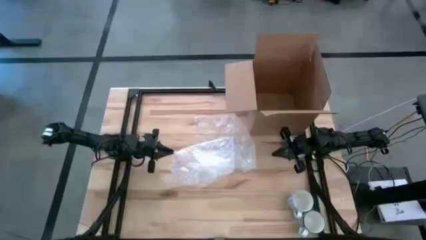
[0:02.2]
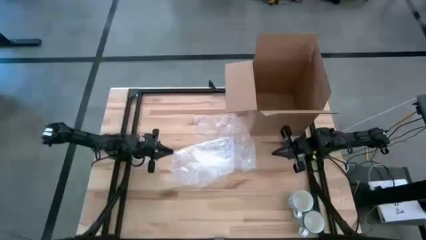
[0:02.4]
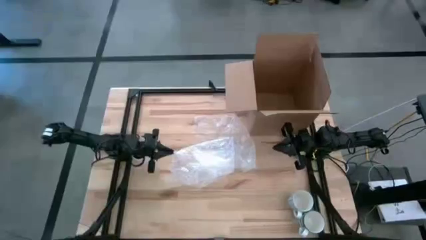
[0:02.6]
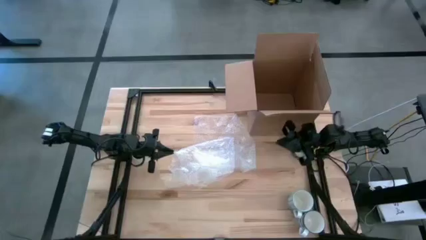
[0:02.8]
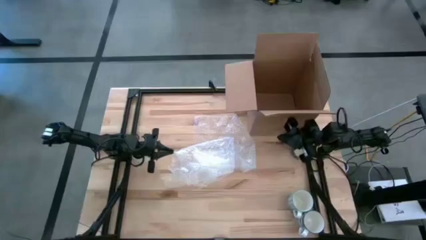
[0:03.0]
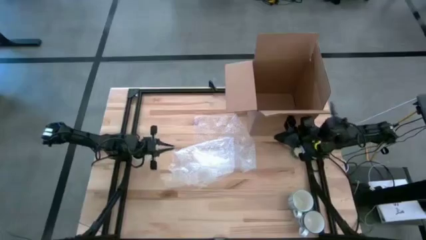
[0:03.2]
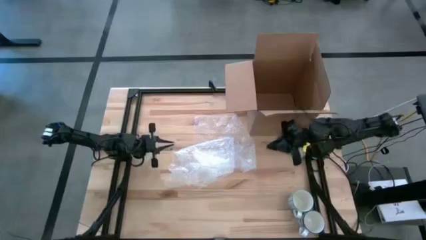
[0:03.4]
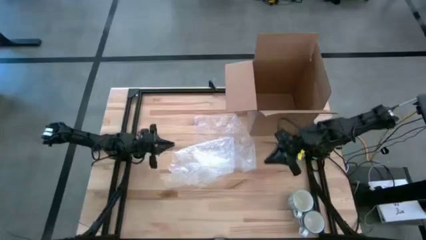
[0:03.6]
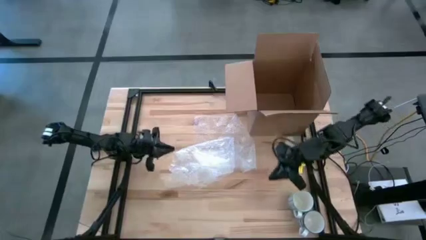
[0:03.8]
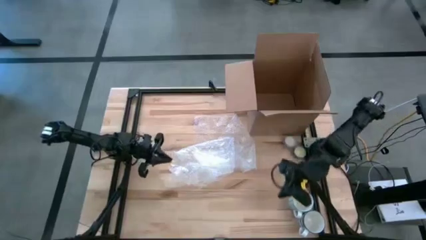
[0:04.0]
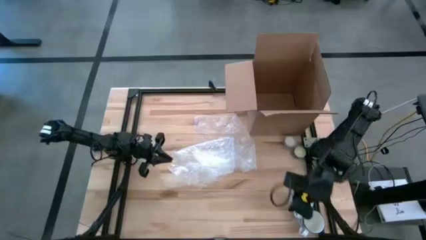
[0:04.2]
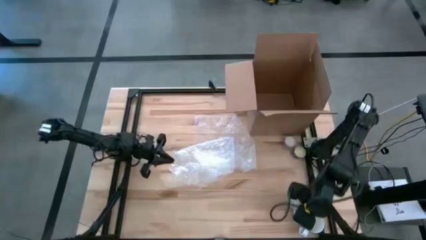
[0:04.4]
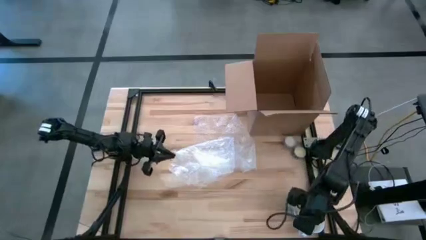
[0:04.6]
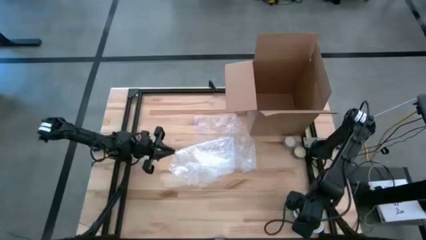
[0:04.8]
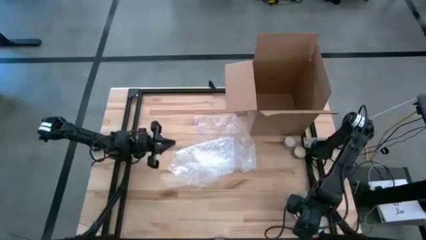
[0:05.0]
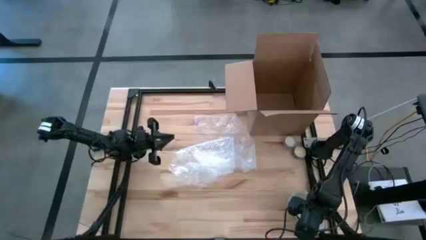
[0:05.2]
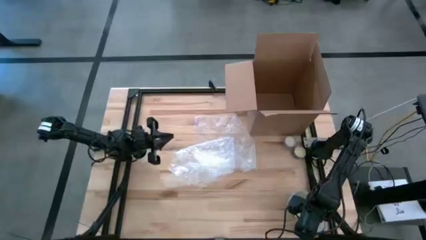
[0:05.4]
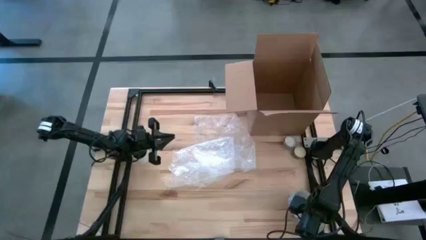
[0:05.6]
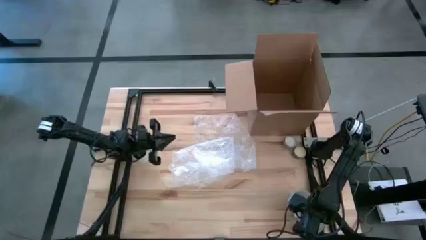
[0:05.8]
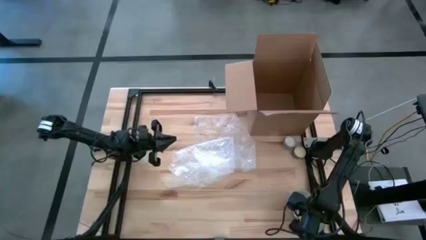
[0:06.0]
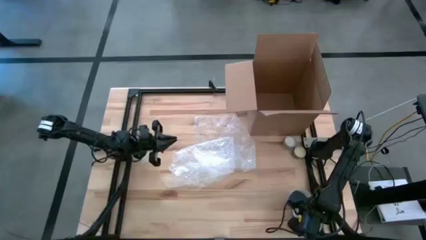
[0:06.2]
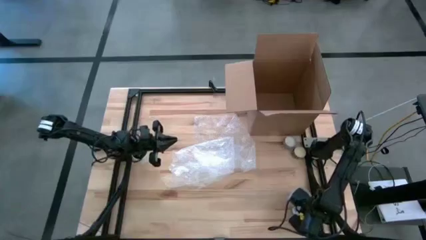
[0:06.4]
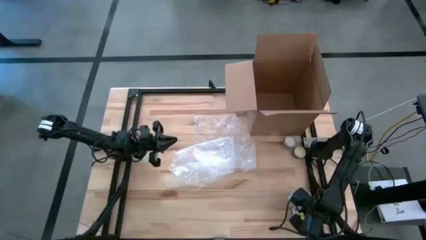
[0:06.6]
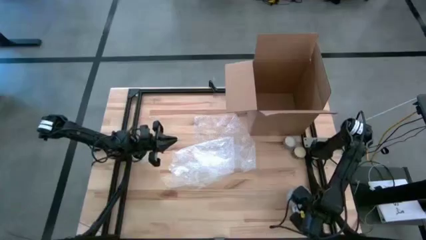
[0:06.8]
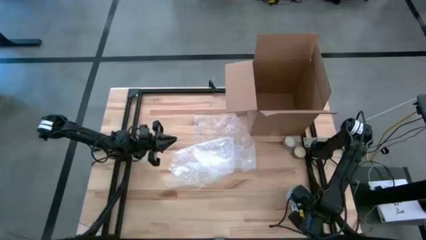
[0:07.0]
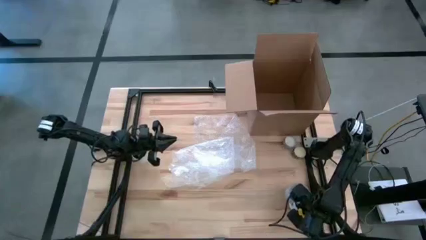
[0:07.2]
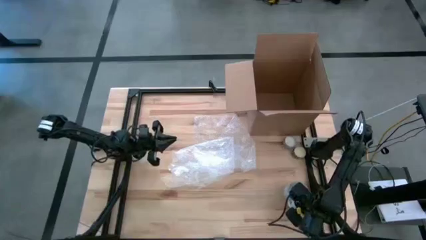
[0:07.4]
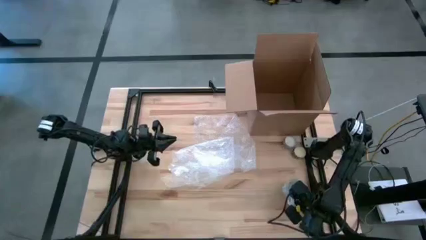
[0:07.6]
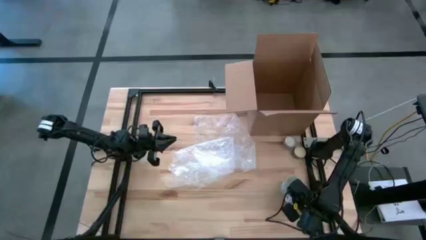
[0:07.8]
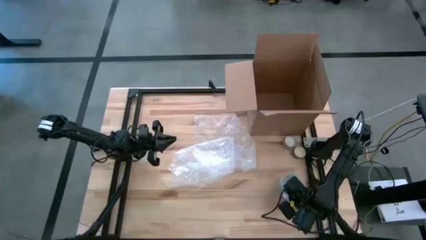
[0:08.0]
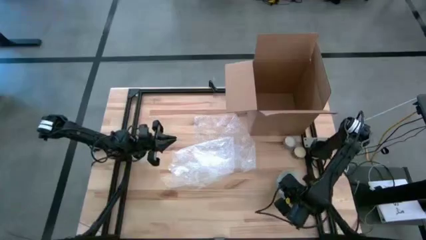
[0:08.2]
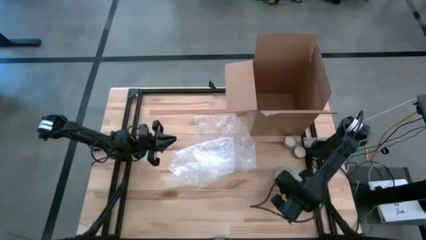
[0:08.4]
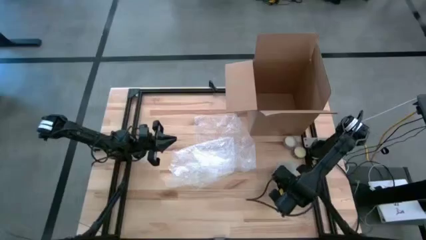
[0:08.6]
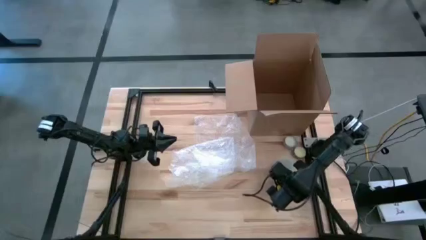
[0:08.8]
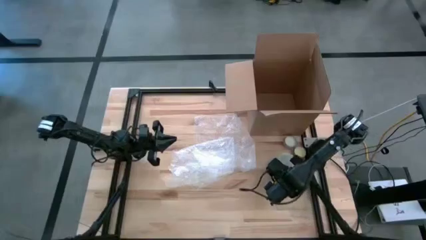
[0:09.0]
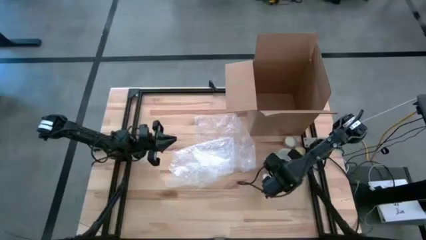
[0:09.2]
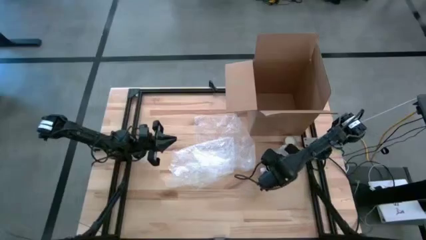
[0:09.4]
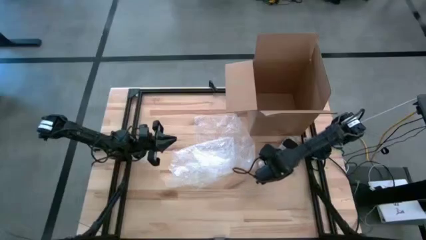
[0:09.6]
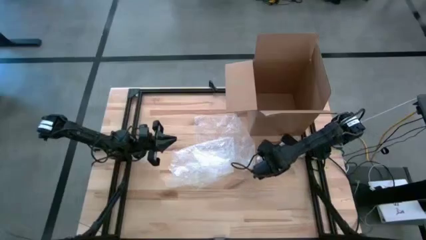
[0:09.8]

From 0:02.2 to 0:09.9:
Task: wrap mug
Move the mugs to the middle right of the table

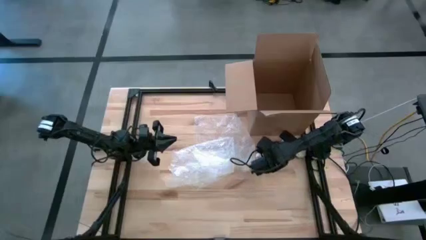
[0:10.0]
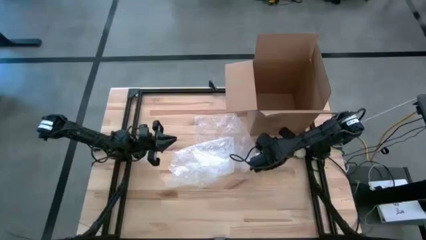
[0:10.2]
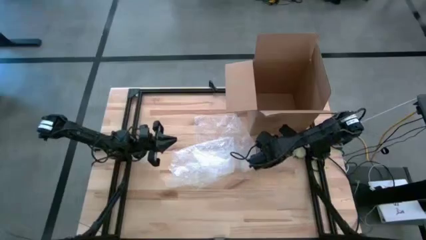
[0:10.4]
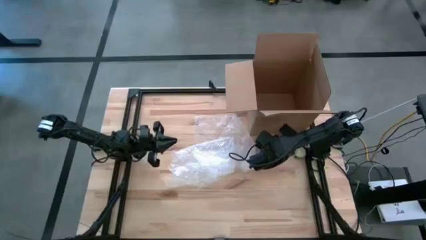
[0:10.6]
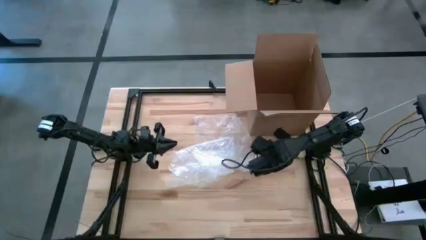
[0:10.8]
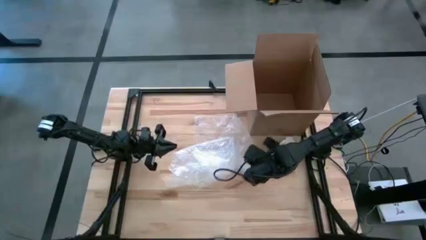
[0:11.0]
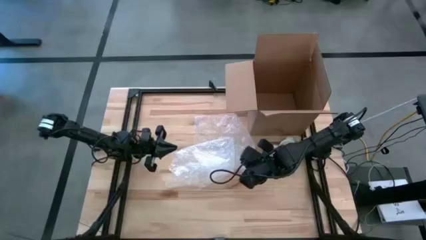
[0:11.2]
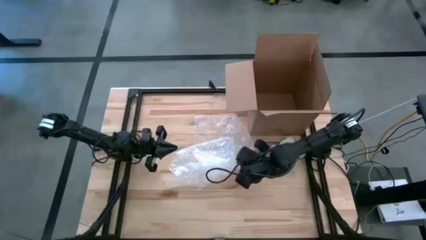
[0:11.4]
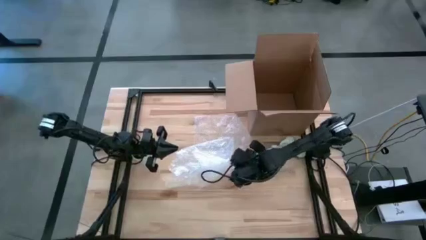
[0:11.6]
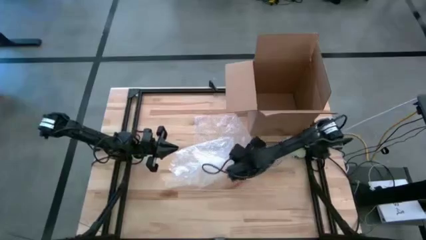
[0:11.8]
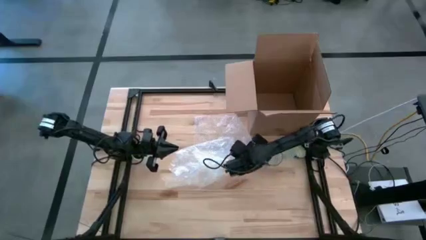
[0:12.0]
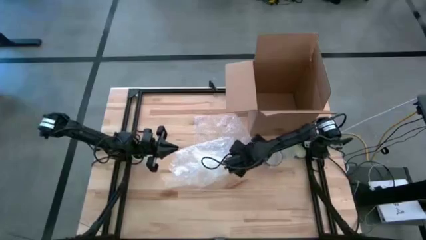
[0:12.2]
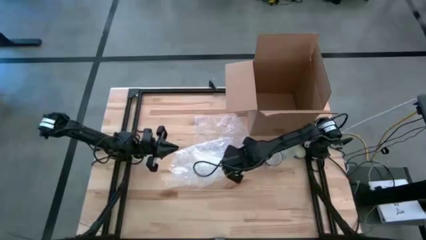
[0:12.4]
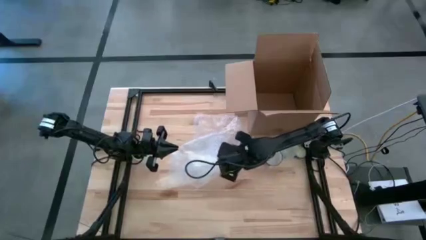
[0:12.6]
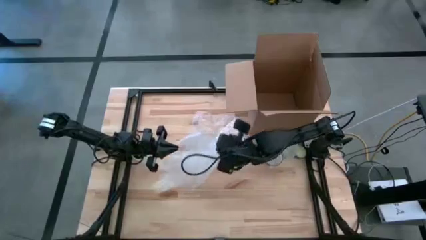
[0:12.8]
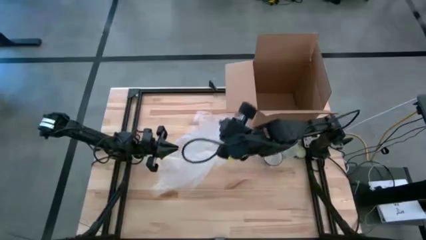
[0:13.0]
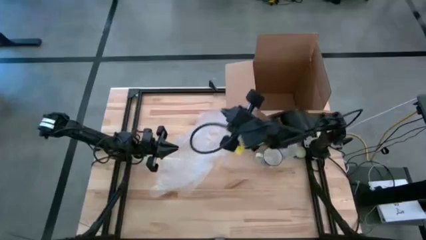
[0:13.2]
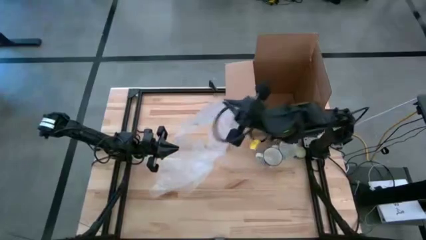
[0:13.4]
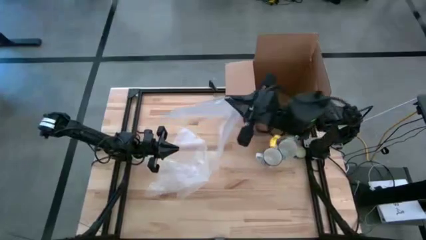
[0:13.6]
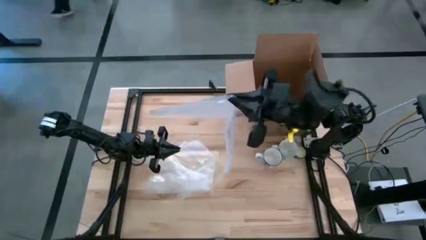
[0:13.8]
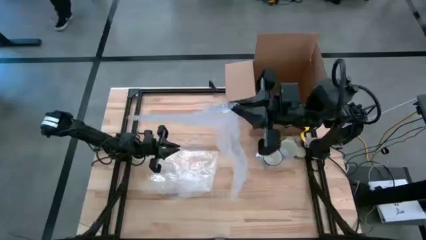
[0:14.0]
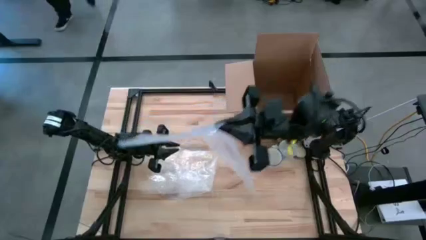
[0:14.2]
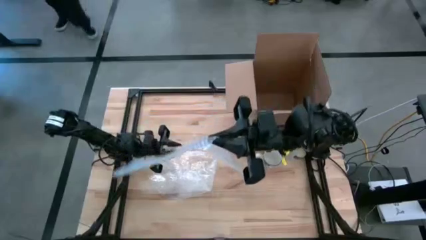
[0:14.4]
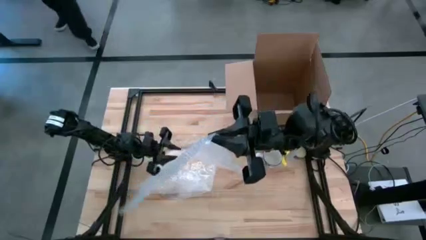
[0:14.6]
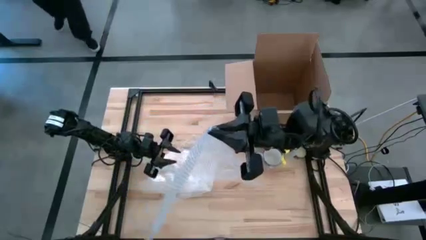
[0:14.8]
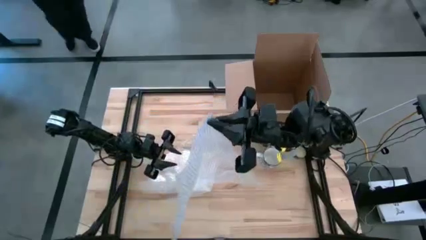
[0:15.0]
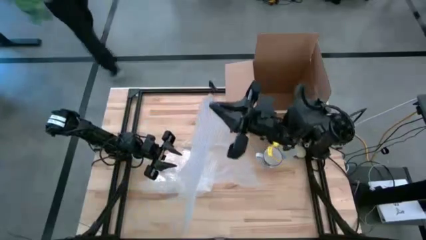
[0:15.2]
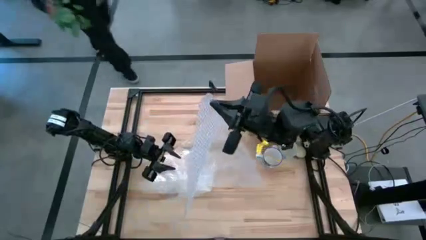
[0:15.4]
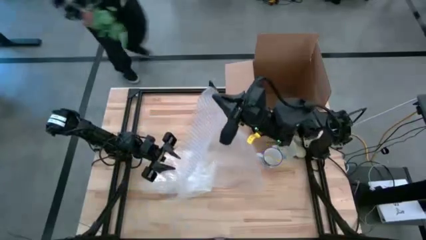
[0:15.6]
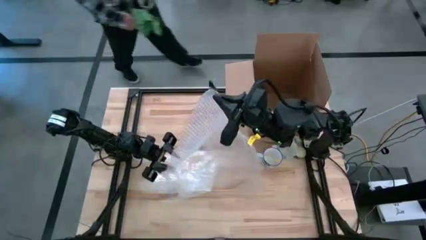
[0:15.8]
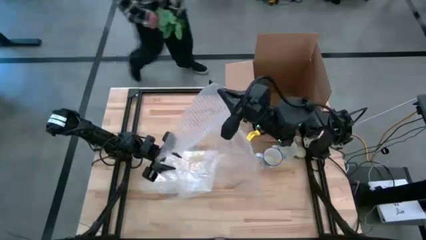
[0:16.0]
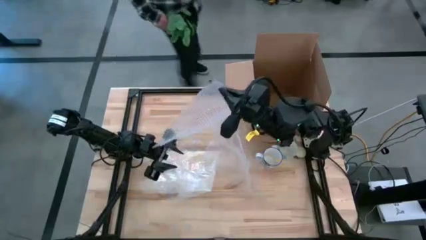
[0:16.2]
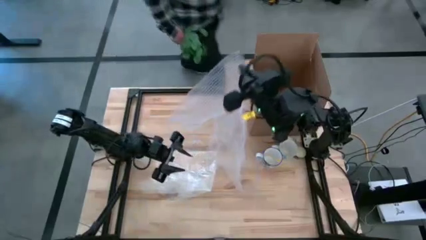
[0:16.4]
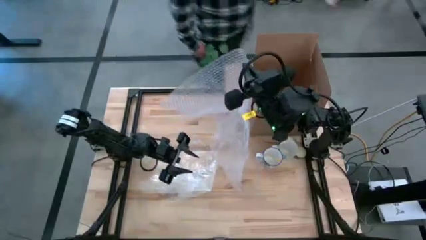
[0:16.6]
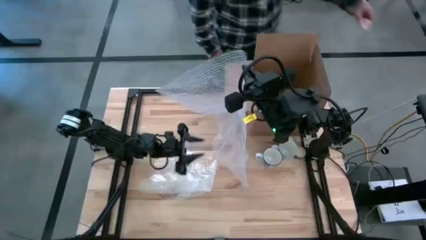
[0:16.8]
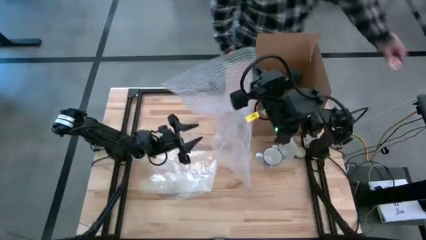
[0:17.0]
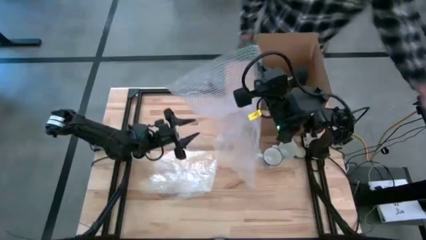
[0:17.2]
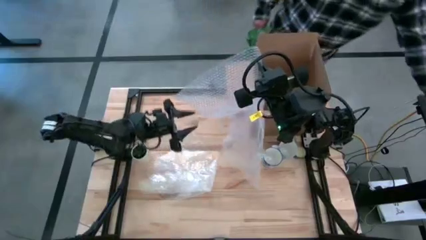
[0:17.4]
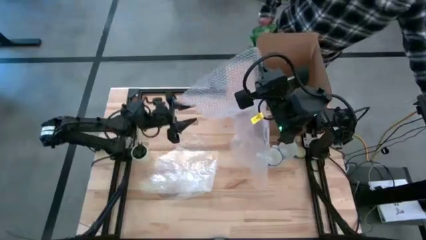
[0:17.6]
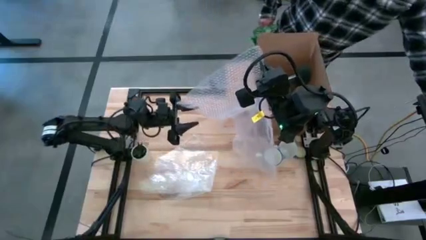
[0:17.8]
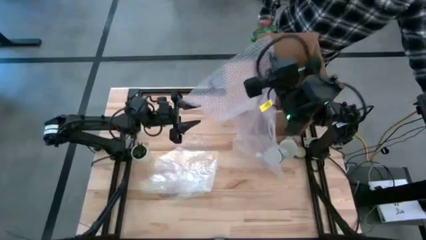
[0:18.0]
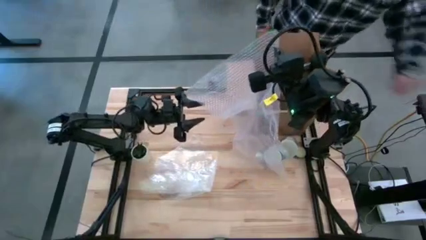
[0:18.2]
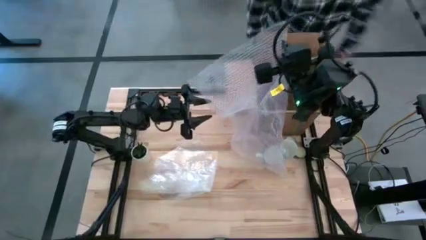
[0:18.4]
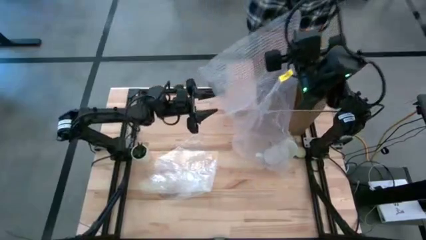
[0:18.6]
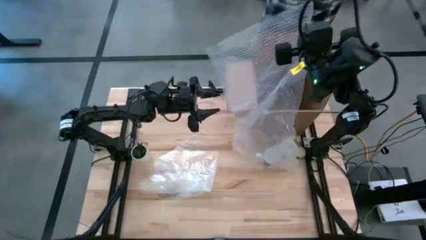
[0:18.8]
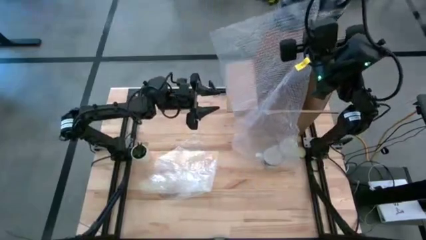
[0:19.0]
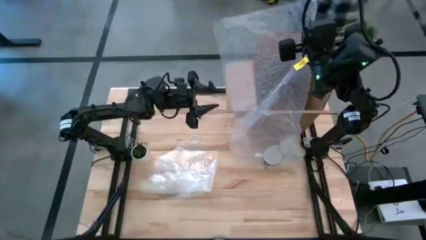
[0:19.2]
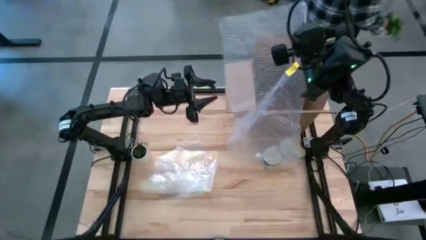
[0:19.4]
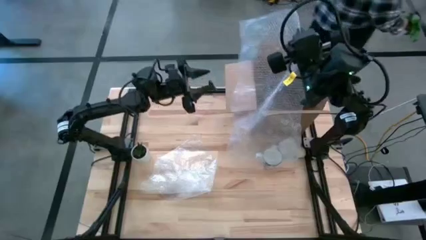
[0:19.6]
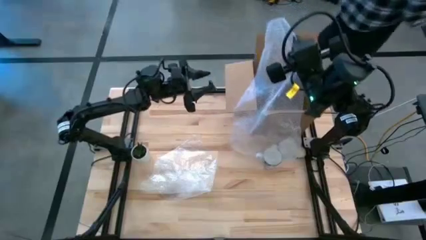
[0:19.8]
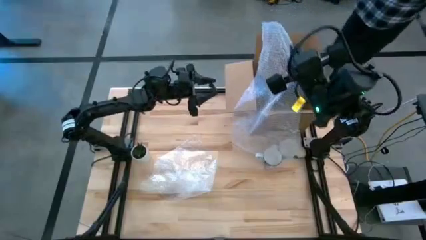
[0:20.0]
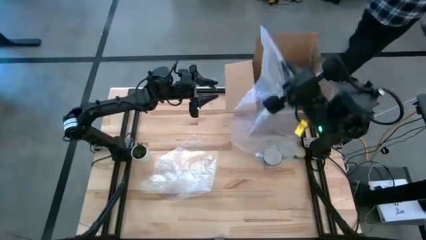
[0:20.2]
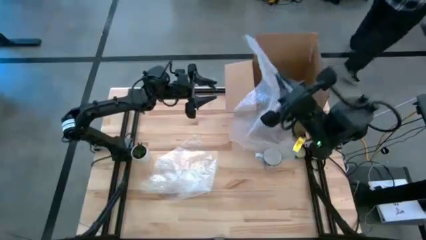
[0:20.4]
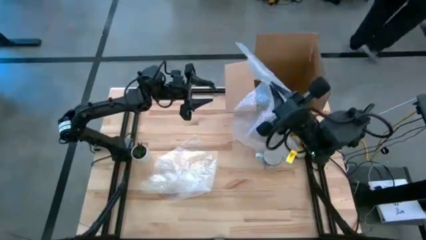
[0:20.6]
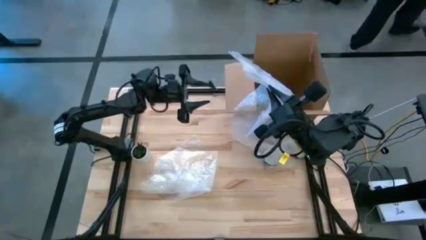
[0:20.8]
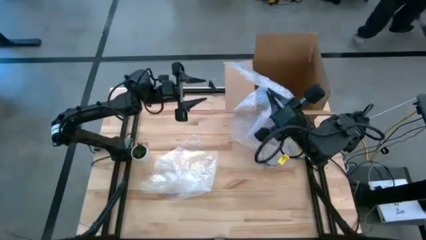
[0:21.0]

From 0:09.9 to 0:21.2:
Prepare the right bubble wrap
